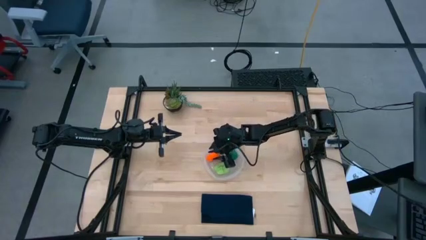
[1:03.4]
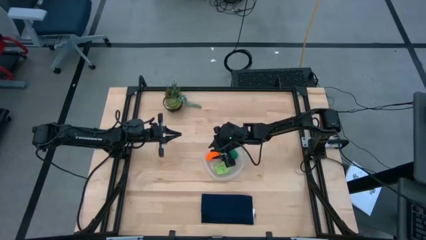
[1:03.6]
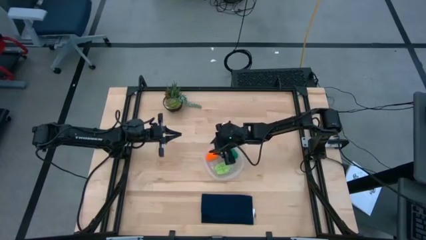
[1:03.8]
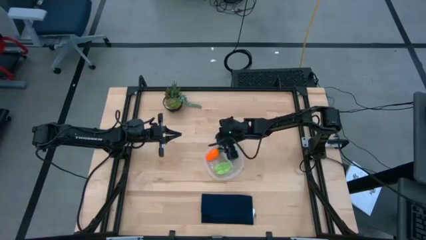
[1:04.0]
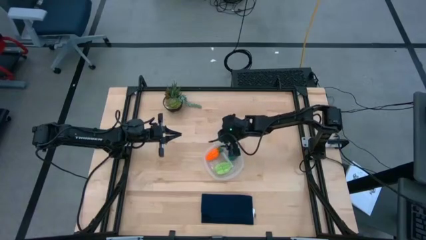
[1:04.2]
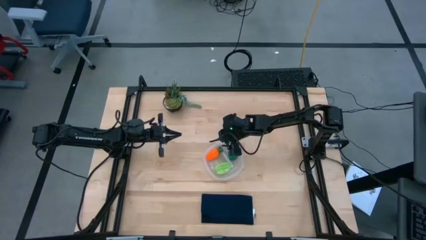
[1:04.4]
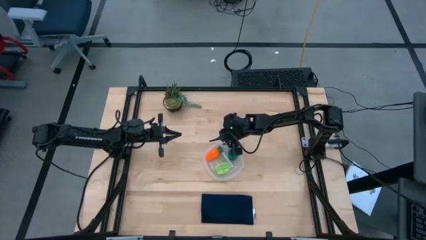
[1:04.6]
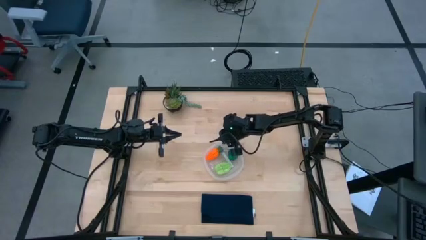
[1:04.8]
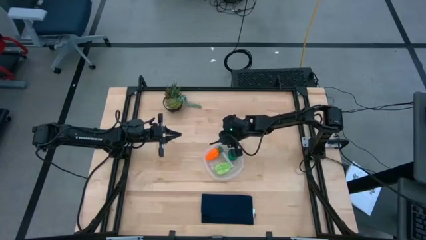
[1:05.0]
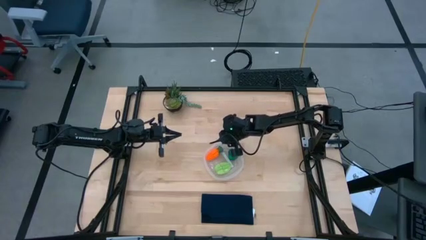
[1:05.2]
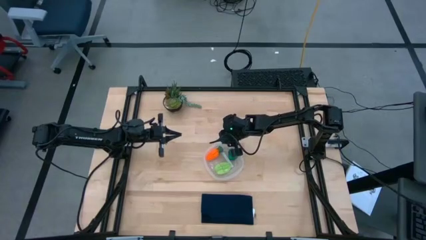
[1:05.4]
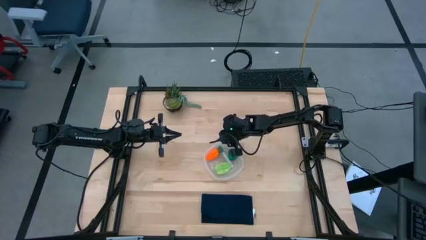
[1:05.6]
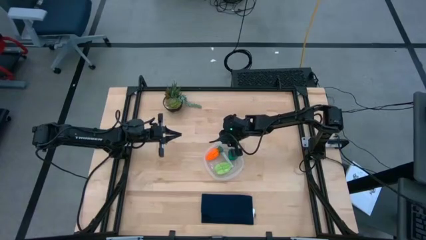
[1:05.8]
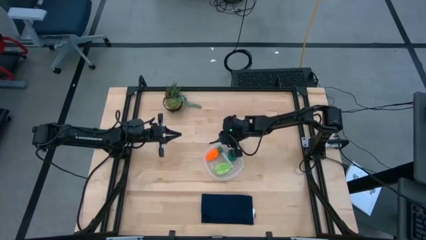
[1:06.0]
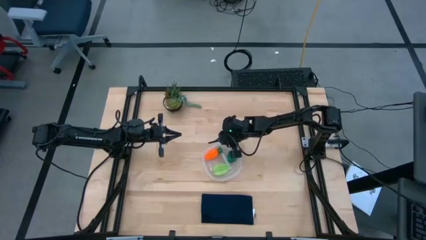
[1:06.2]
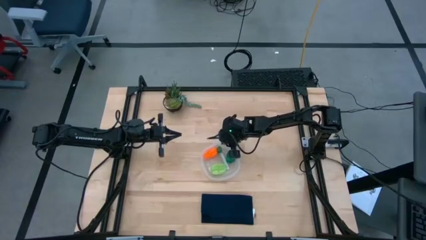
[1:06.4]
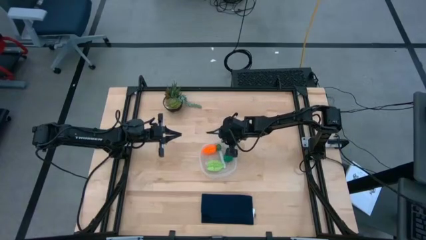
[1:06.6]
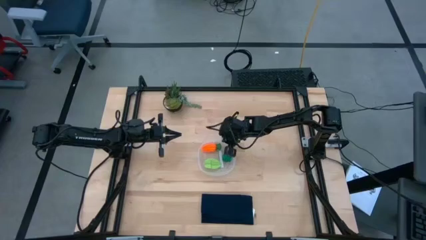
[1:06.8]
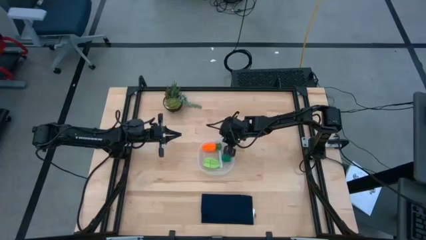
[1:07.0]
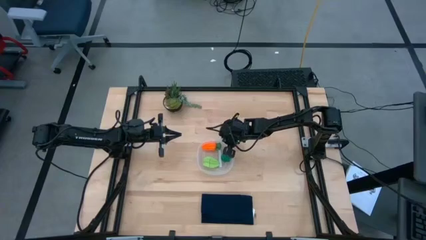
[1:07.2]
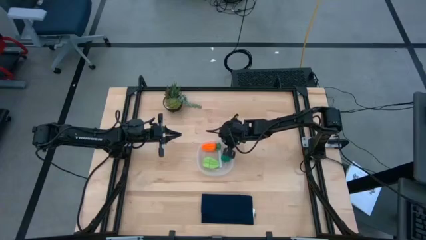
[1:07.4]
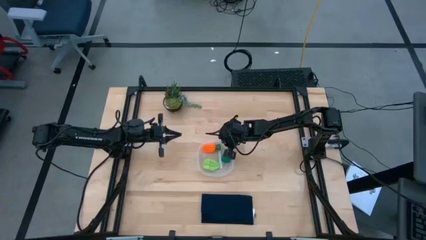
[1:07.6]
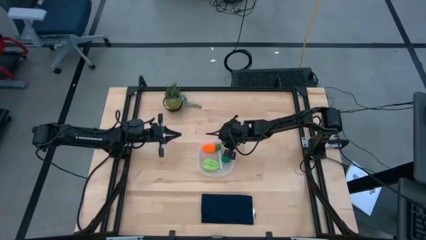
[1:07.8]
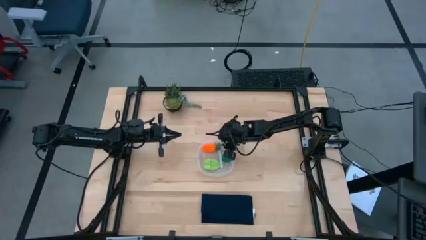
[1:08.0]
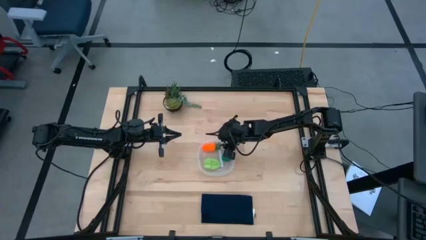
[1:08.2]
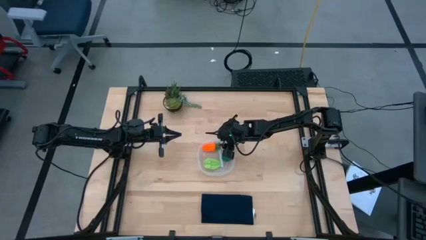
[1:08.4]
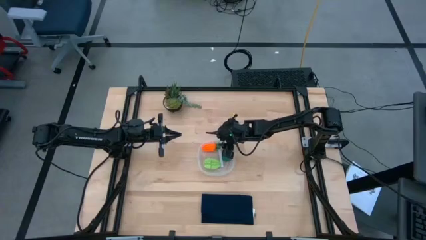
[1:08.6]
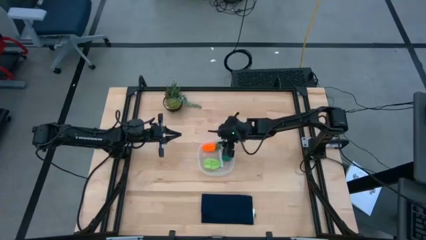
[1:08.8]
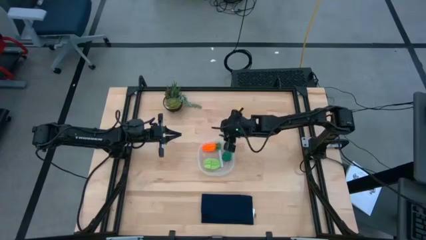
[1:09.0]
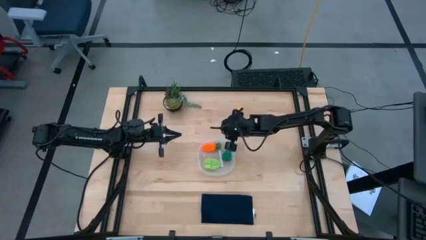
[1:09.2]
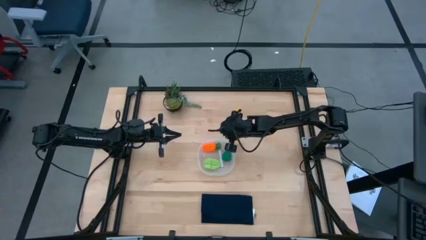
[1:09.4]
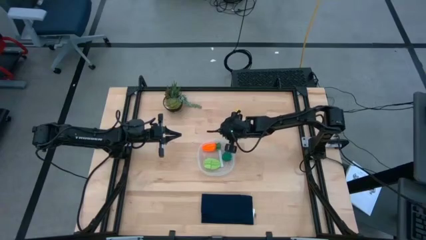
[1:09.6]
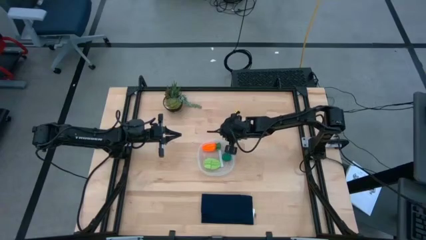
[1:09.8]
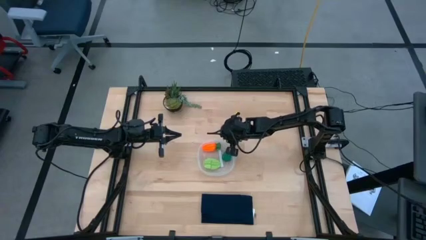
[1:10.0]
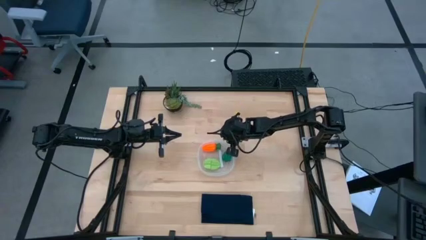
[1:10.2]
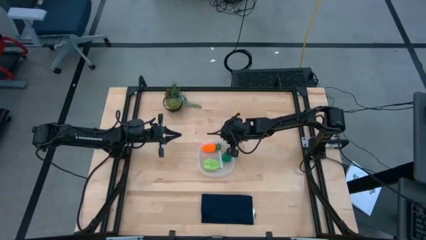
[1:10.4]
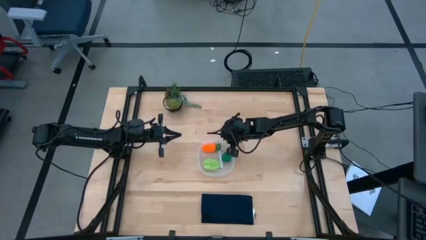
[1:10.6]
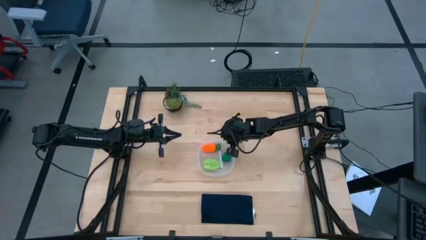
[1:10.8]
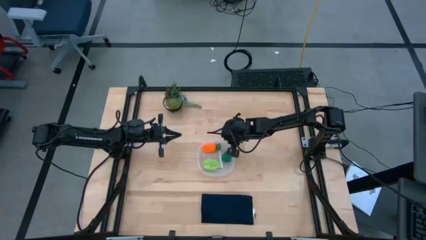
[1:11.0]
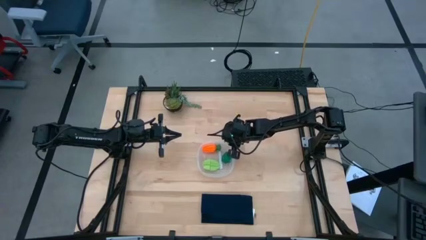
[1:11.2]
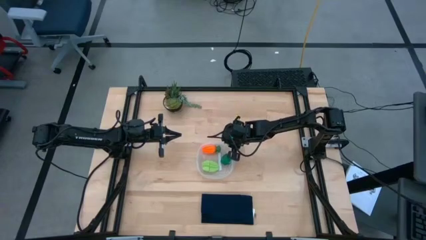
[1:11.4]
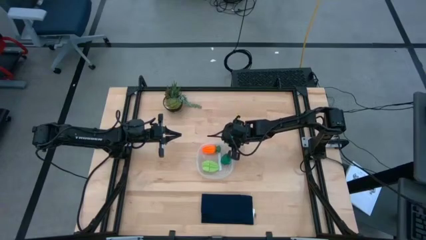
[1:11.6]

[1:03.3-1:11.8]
Task: Pick and placing Produce into tupperware
Adjust the transparent bin

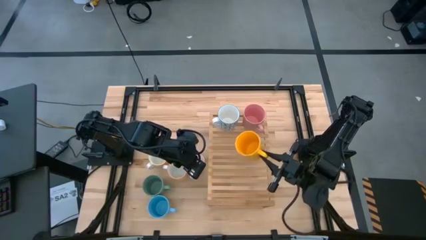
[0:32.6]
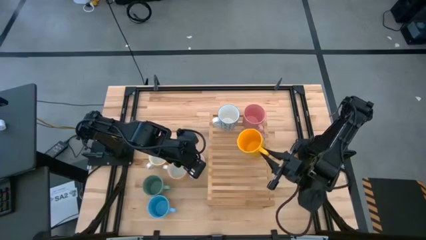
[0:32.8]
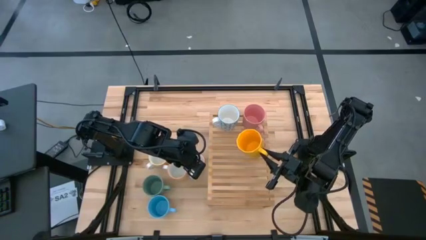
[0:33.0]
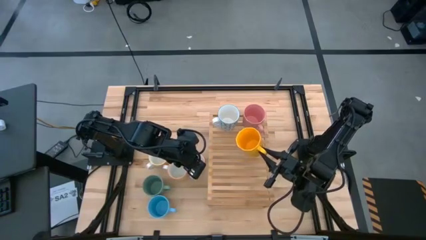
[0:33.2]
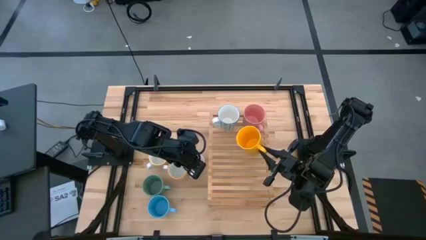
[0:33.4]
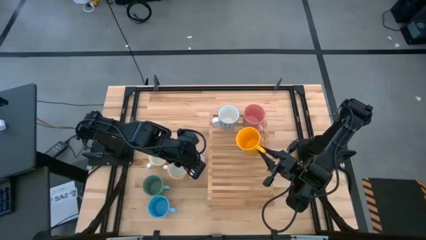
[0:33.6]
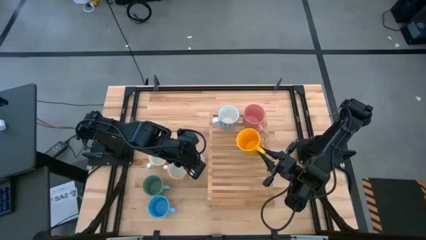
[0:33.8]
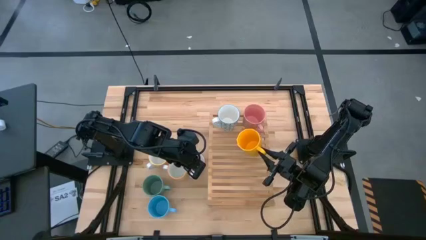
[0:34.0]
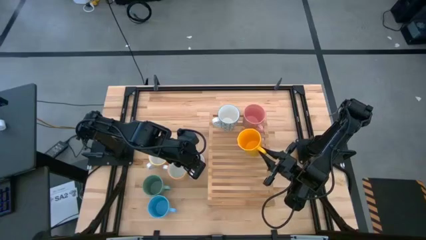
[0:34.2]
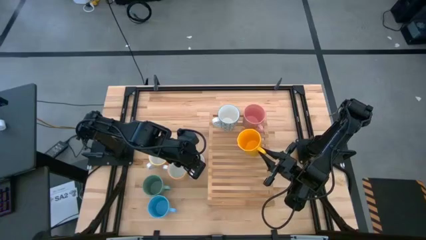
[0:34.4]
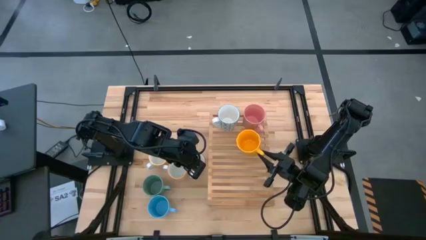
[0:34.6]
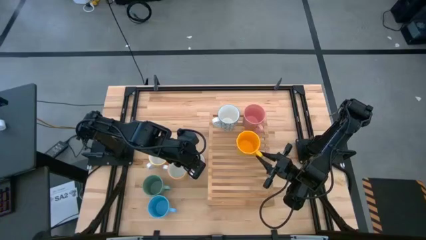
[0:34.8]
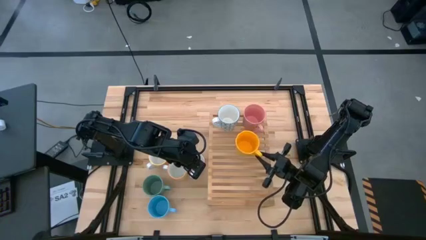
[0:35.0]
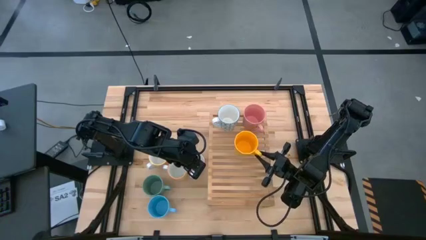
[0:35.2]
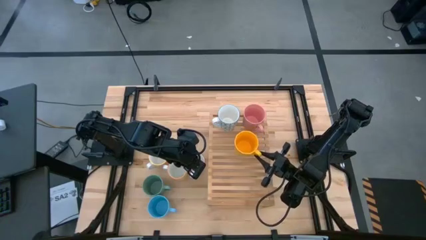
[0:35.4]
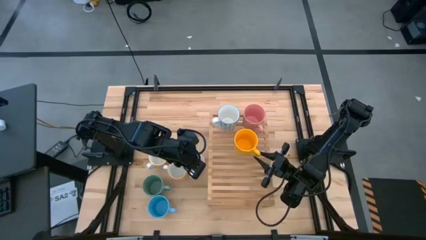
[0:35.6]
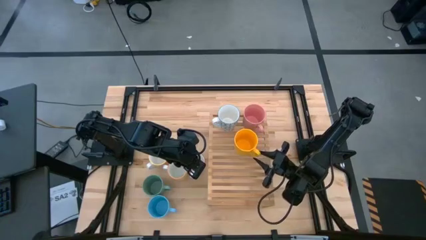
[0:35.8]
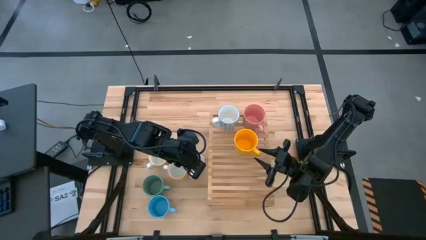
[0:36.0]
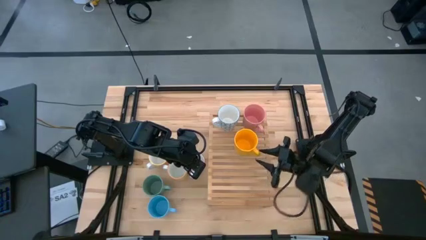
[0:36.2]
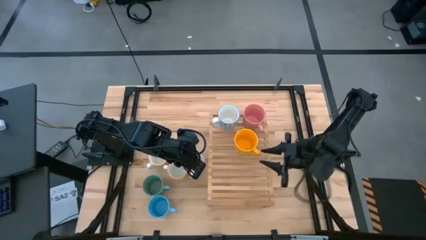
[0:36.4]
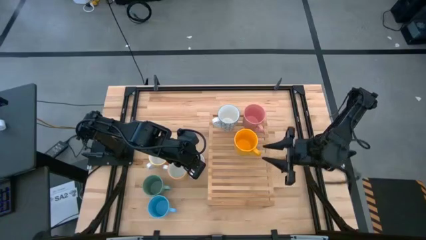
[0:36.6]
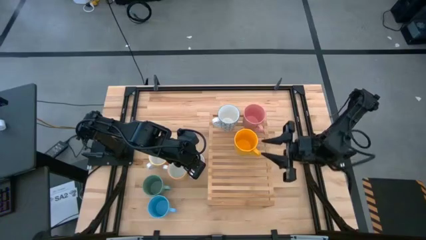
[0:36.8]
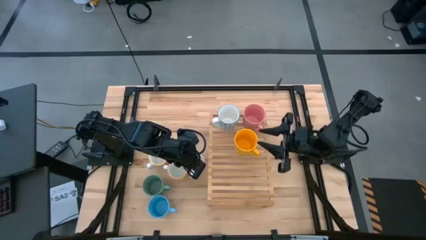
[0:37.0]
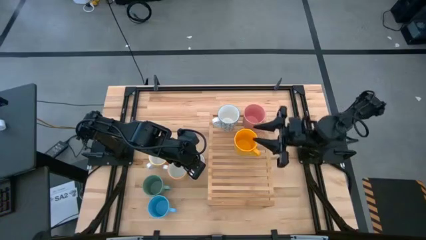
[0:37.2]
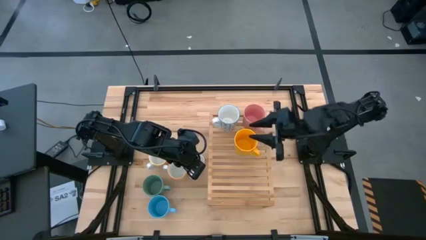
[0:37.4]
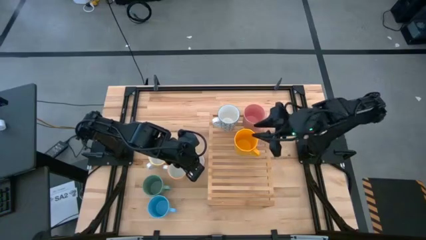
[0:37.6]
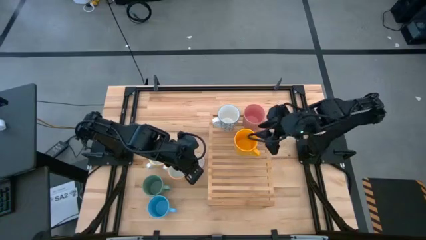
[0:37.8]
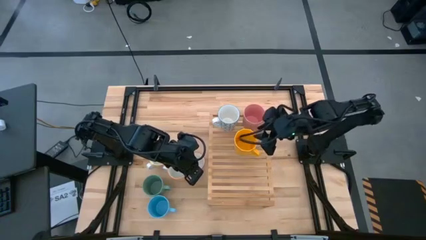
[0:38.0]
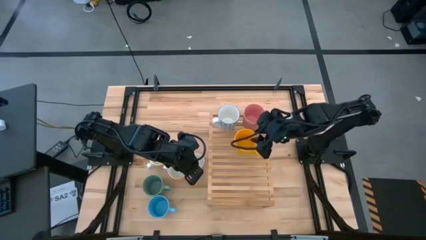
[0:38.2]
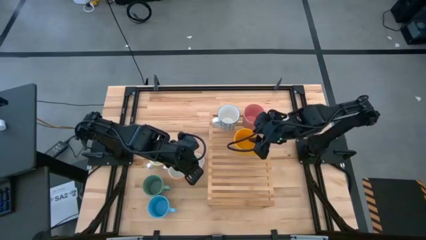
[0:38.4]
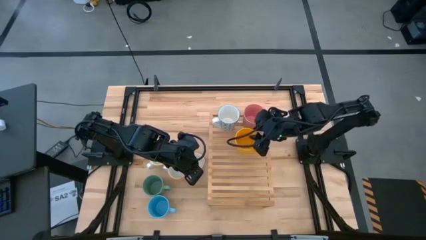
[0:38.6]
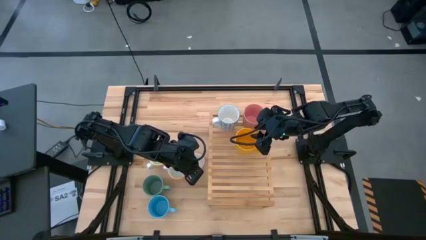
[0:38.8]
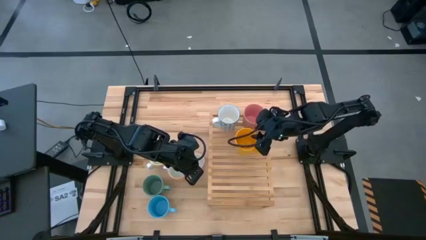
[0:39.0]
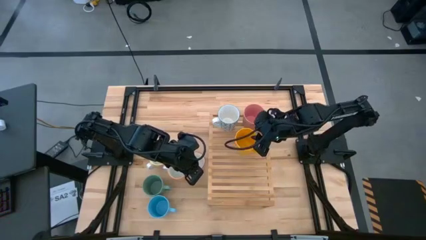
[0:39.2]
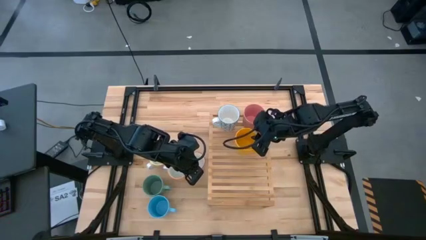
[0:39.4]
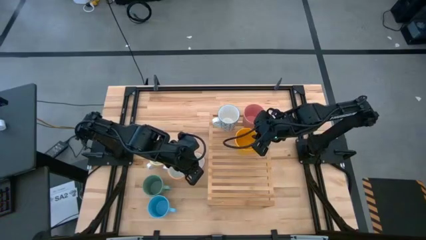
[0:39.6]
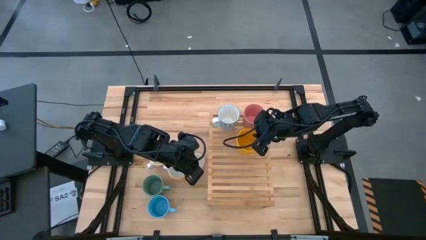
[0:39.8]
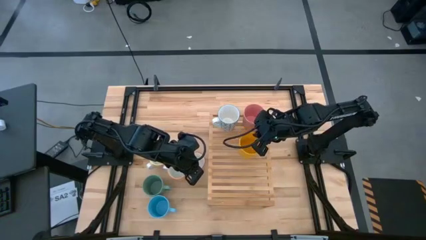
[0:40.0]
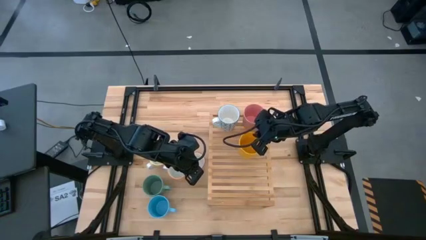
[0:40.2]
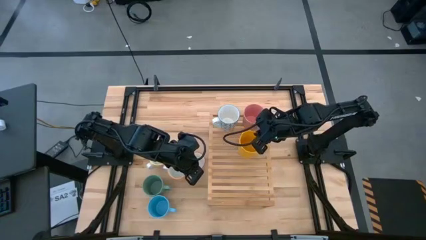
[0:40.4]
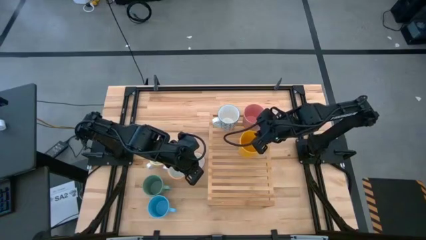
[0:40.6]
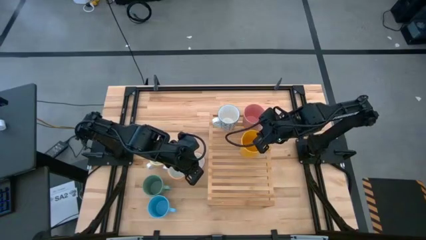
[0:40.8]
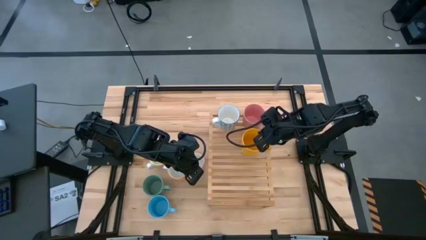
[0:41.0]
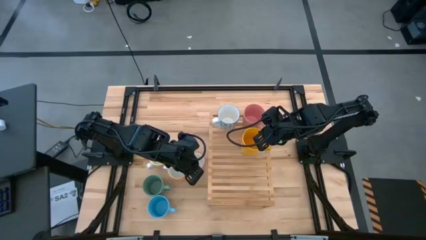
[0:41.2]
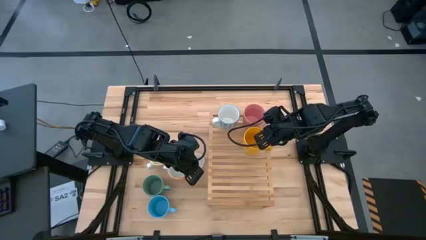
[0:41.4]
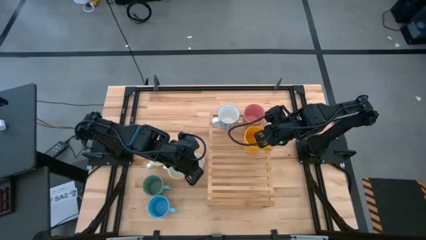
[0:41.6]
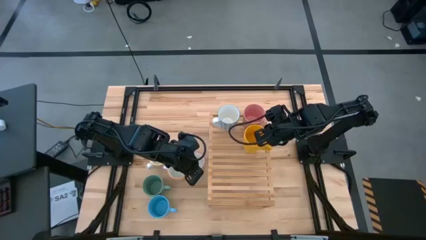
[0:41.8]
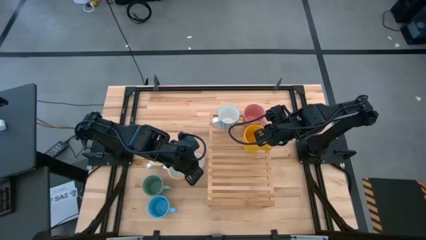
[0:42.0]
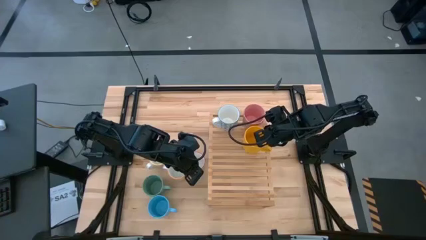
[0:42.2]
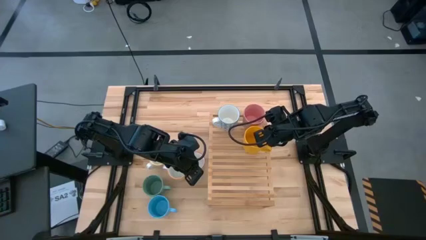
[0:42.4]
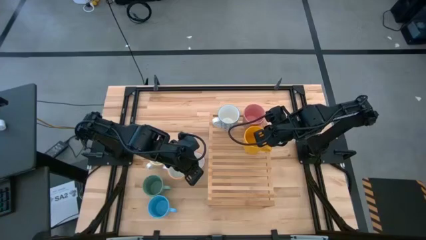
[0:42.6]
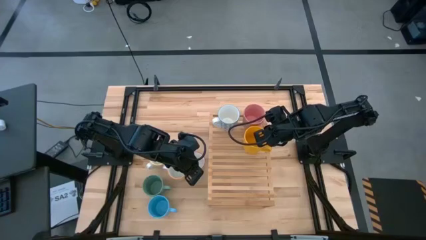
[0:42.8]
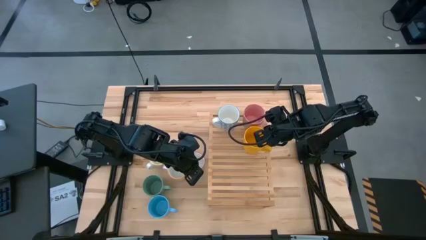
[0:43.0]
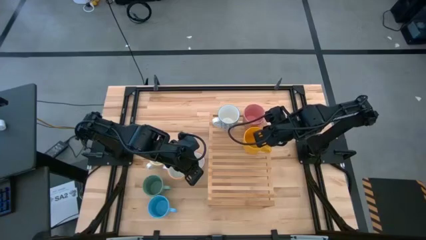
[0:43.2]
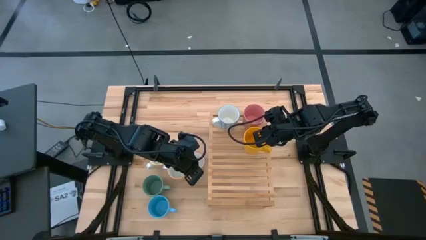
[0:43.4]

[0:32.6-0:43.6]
Task: Place coffee mugs
Put the yellow mug on the shelf
